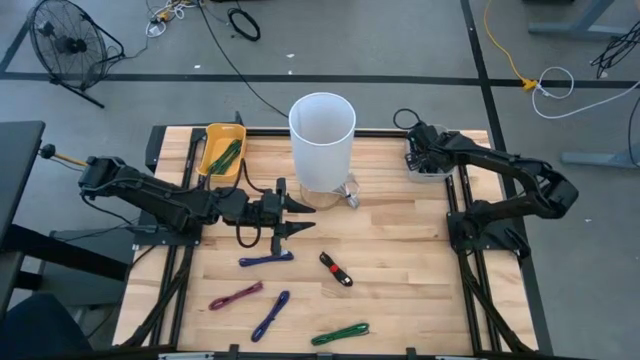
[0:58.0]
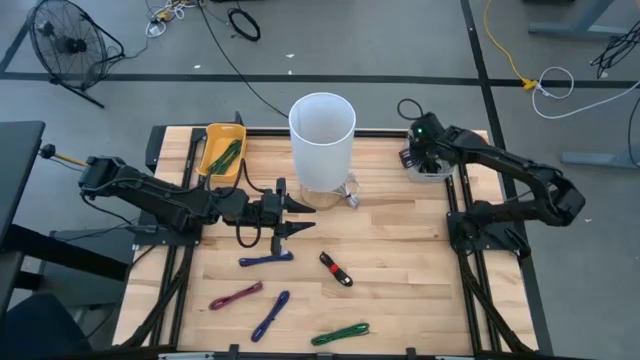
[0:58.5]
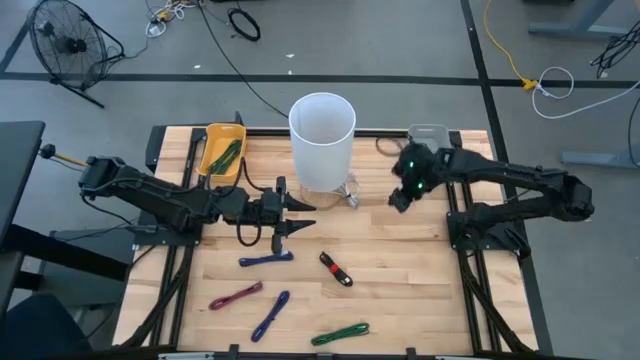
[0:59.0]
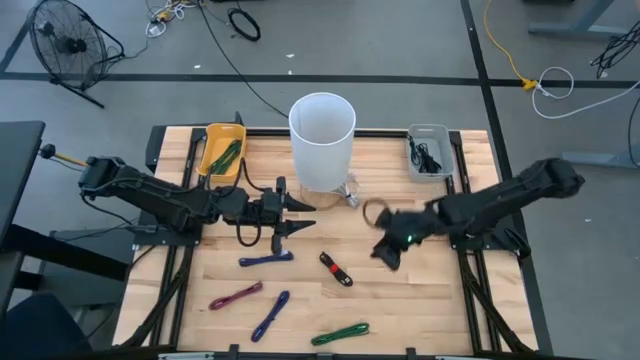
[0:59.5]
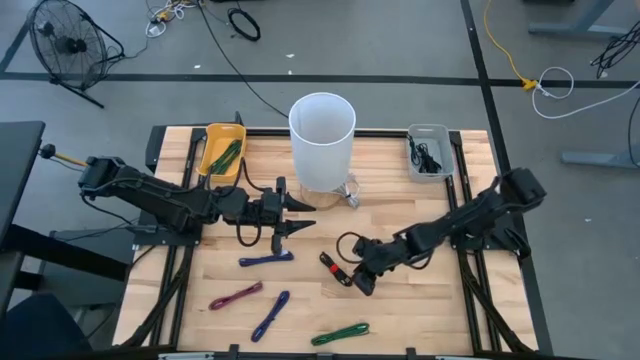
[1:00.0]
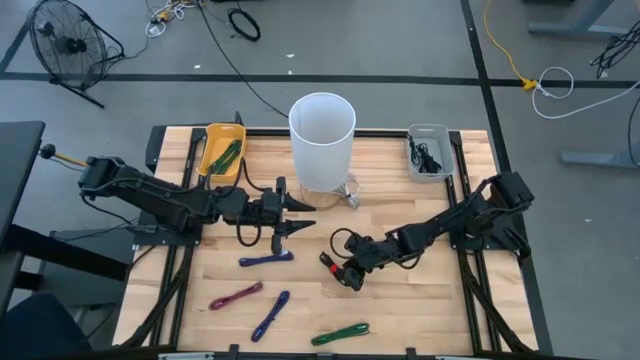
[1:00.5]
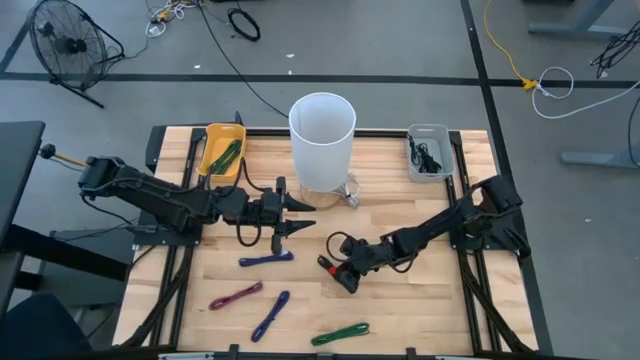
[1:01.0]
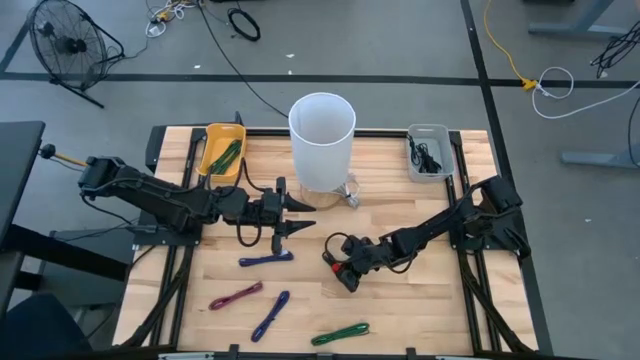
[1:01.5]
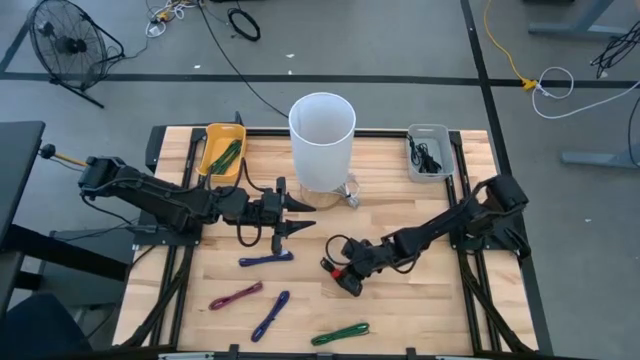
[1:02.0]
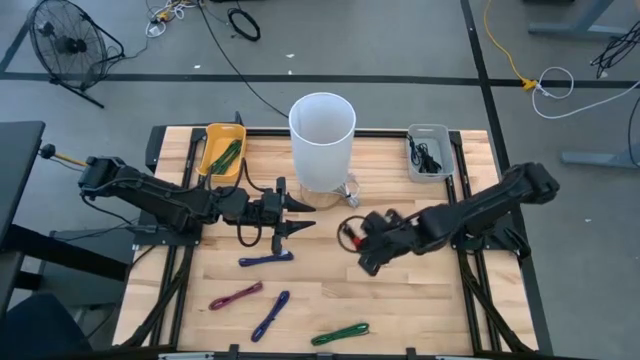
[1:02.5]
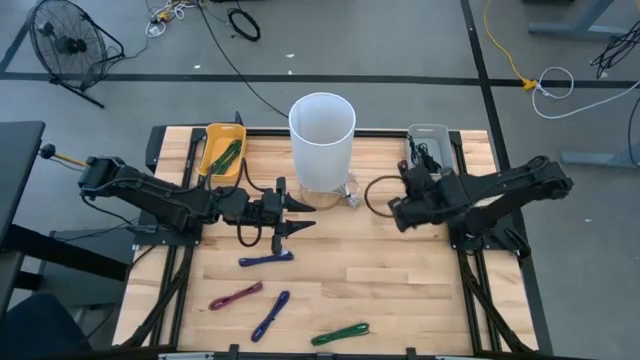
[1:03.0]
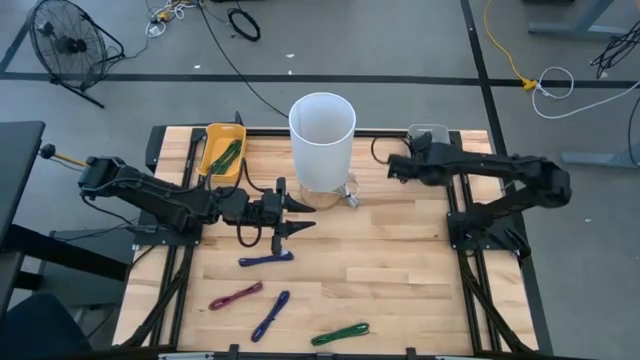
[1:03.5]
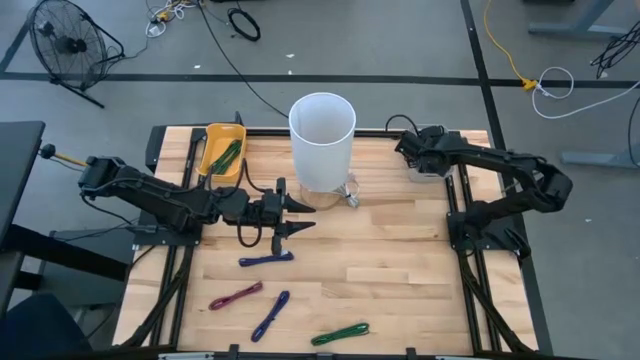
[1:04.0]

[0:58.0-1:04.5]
Task: Pick & Place USB Port
Put the black USB cable into the gray bin

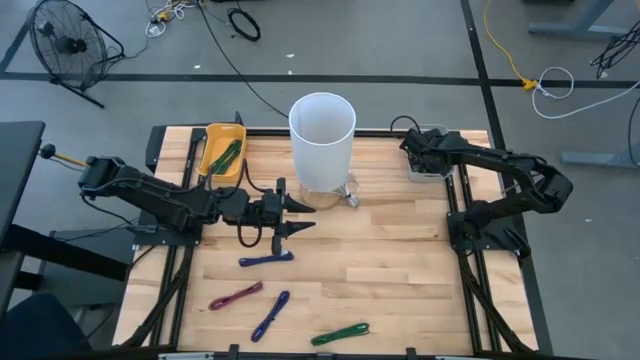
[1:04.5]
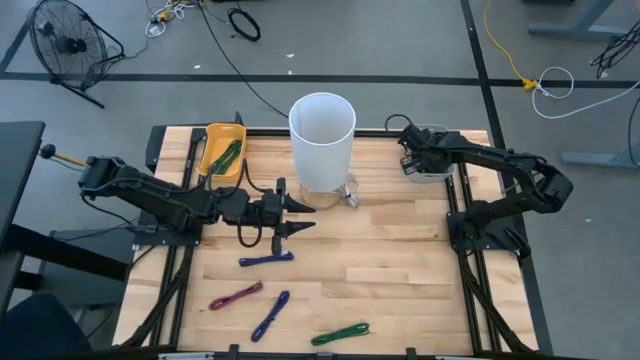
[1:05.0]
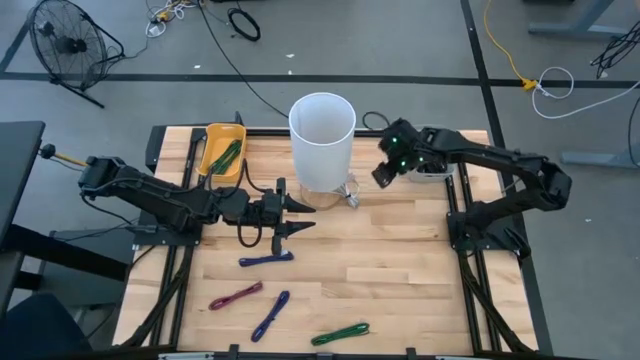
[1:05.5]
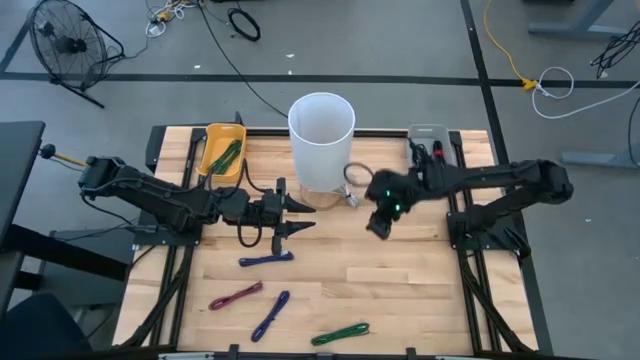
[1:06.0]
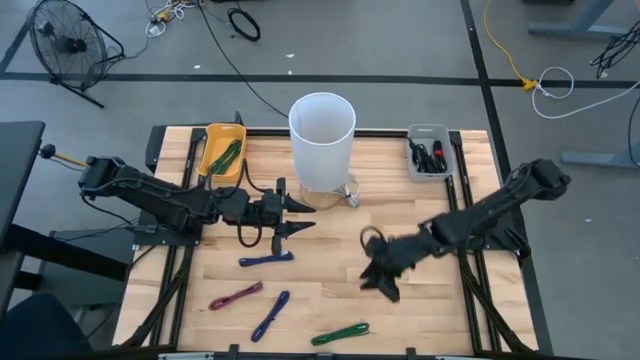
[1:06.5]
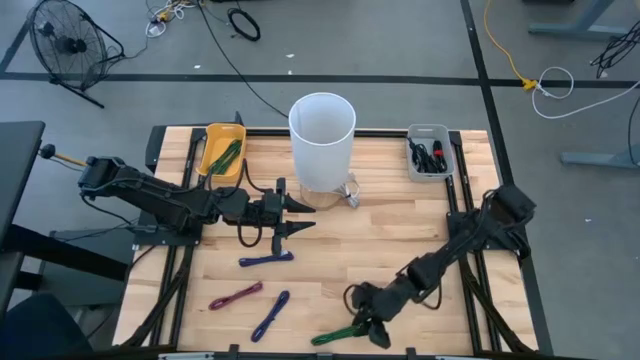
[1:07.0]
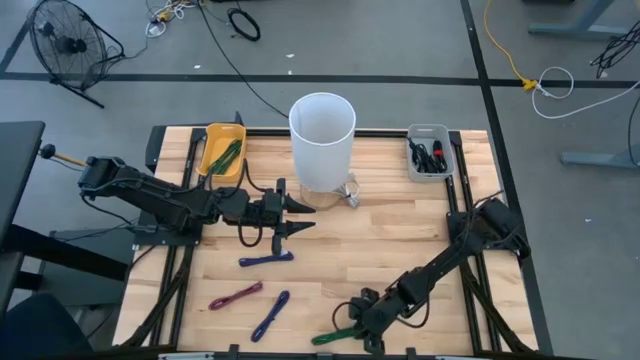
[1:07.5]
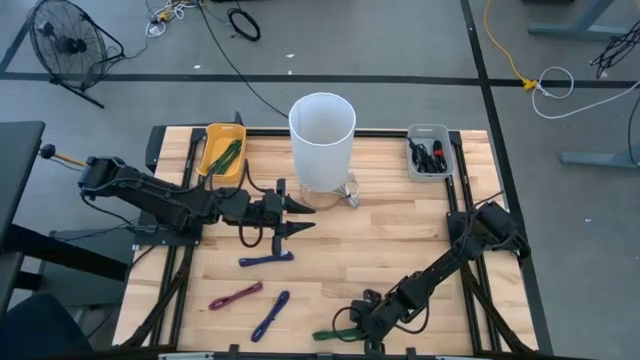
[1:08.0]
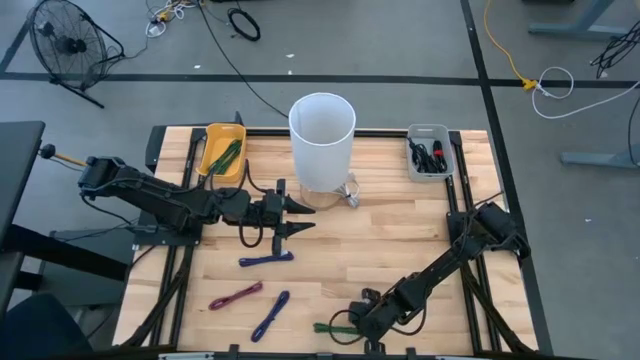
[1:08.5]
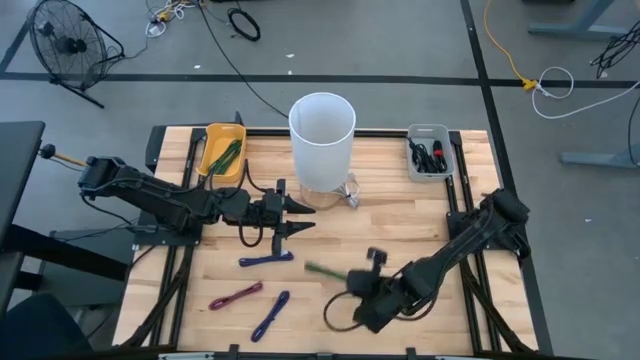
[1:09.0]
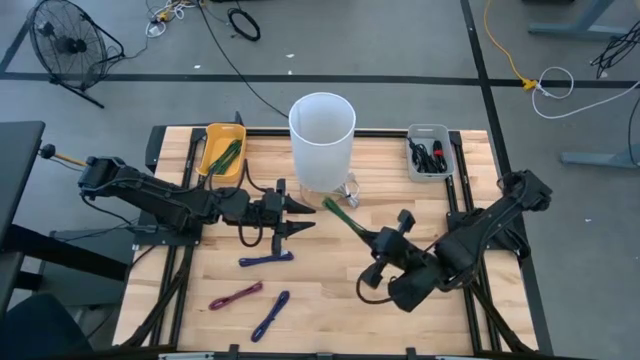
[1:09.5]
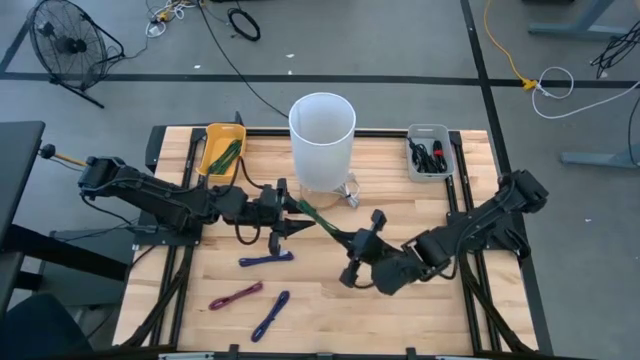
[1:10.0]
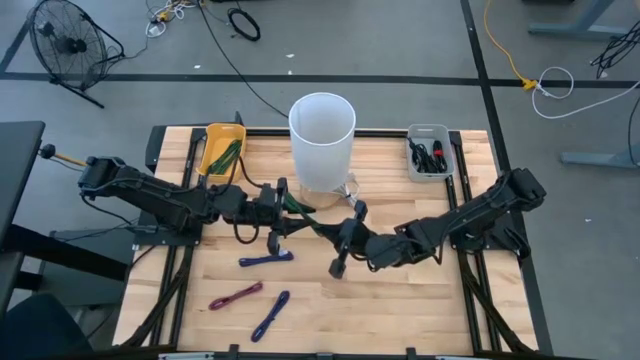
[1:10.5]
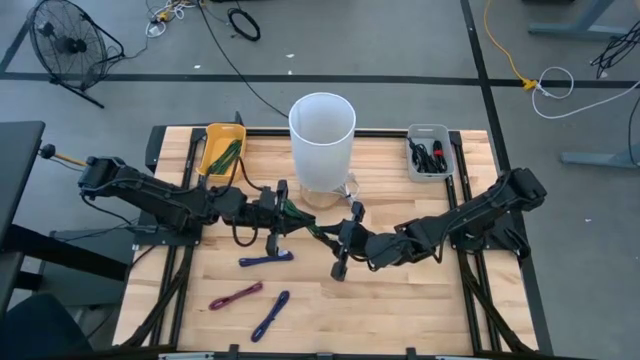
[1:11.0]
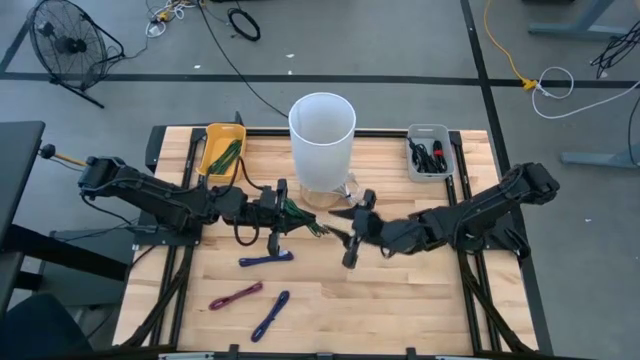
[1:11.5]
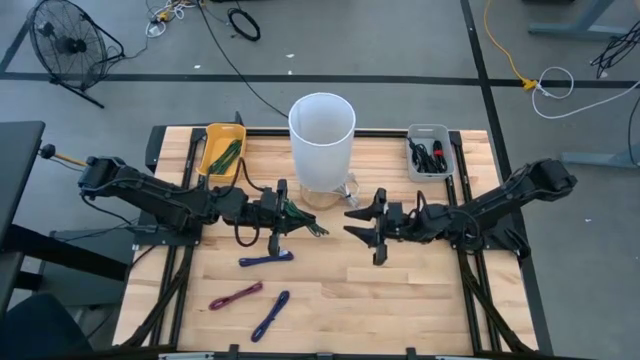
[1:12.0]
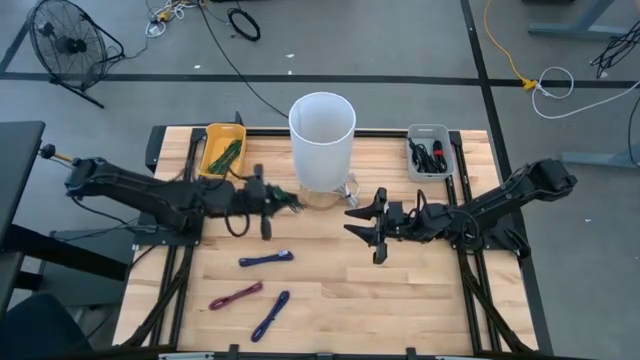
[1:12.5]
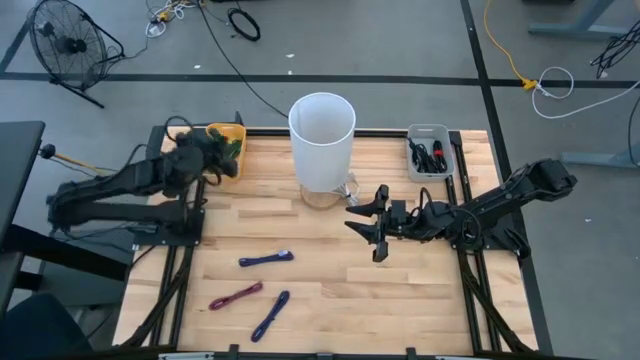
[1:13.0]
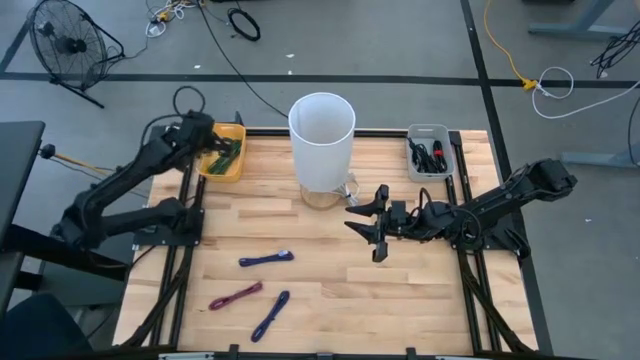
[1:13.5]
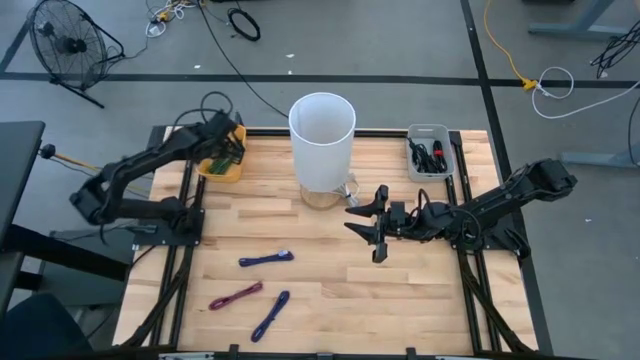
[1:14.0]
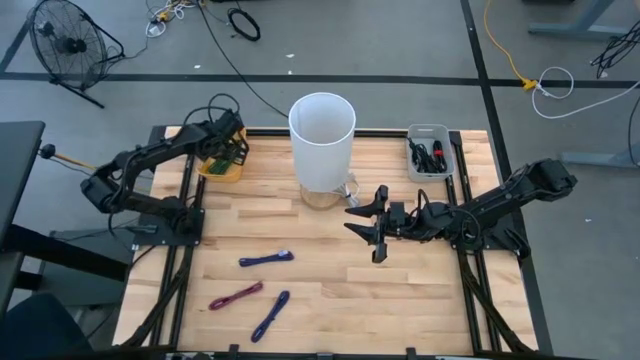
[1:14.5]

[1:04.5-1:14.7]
Put the green USB cable into the yellow bin

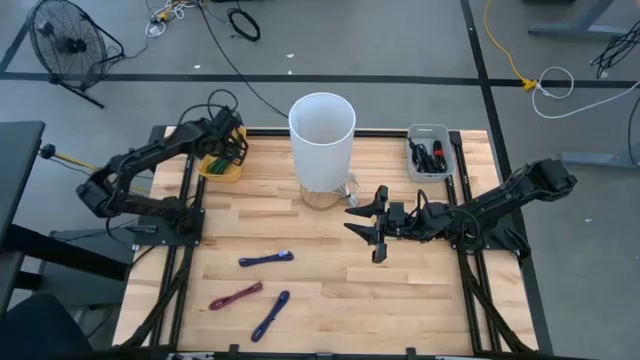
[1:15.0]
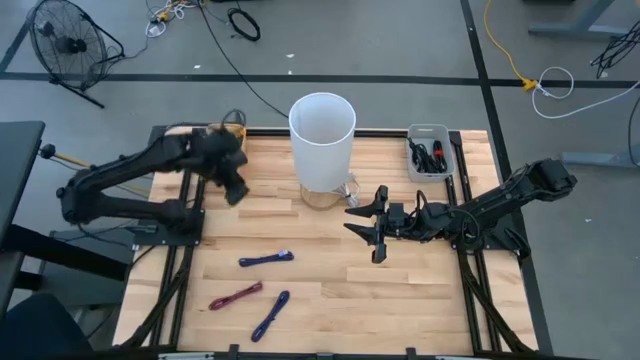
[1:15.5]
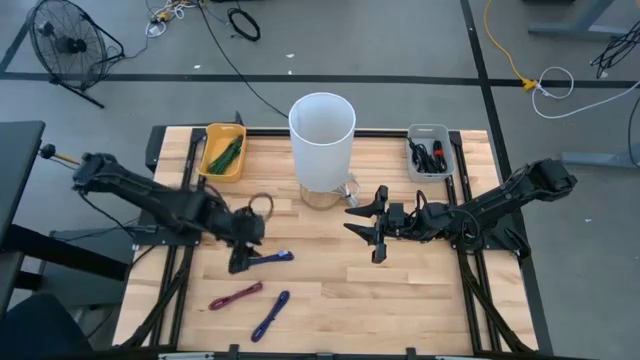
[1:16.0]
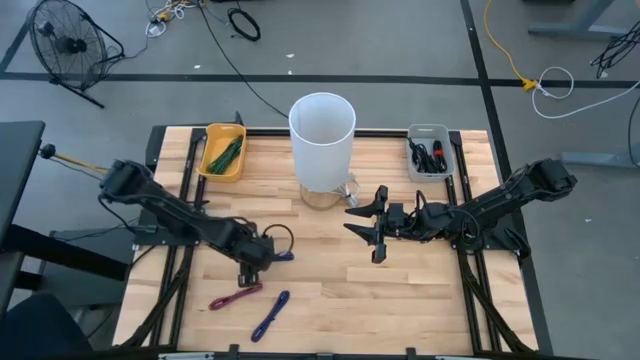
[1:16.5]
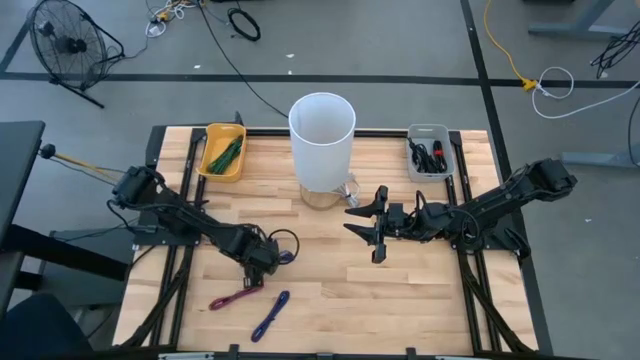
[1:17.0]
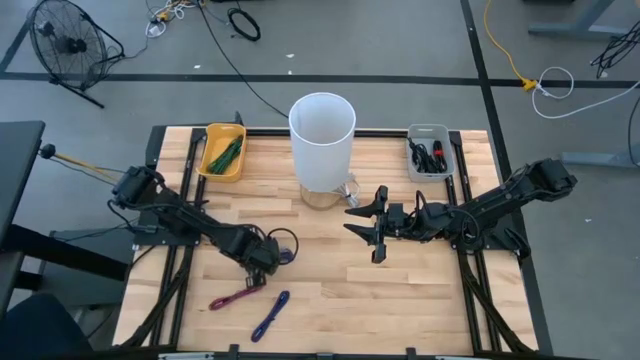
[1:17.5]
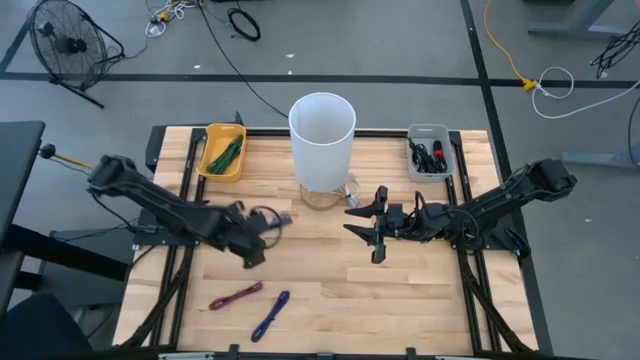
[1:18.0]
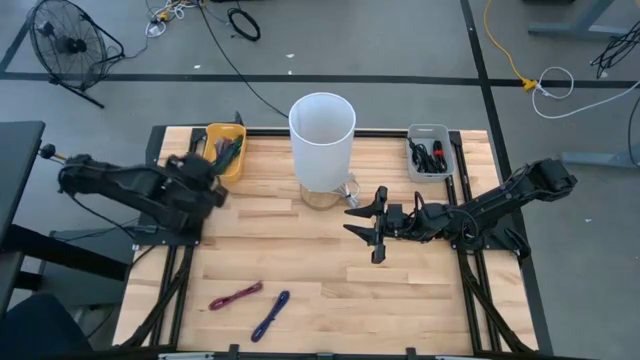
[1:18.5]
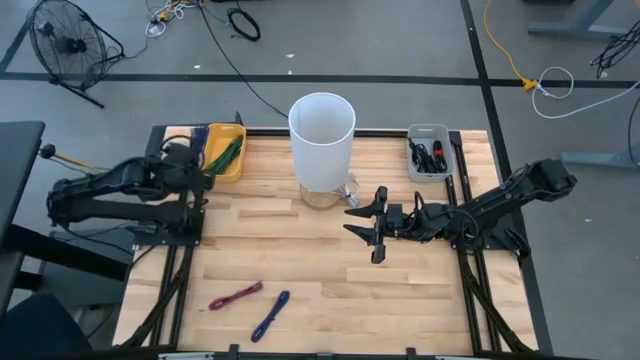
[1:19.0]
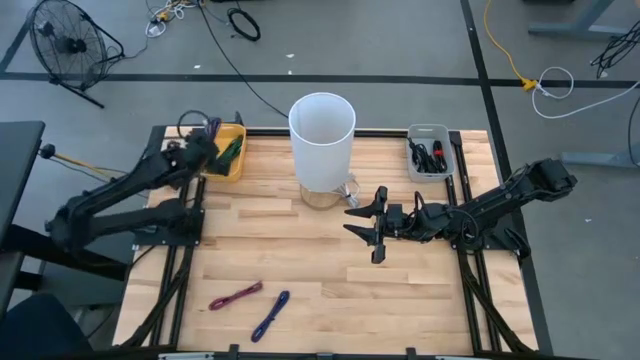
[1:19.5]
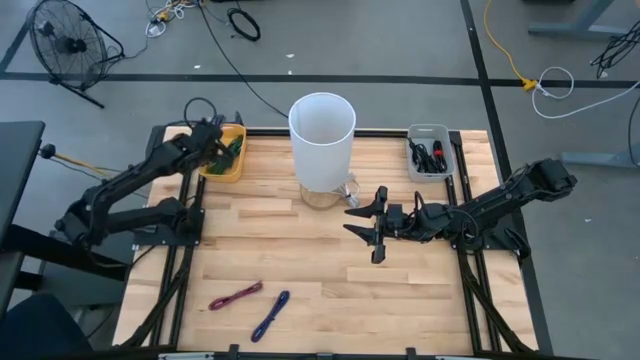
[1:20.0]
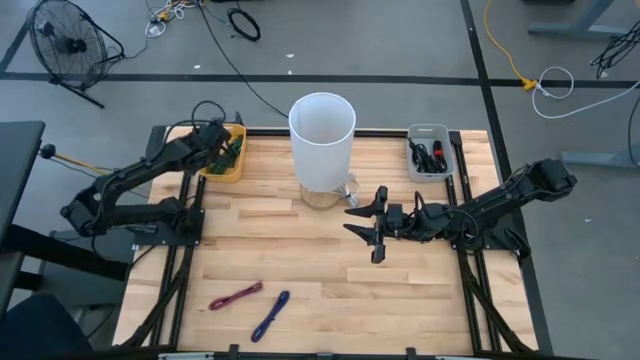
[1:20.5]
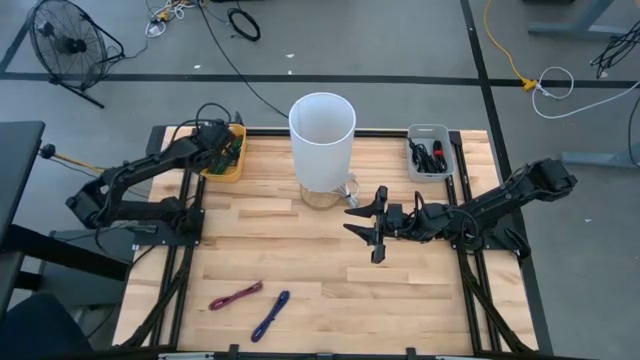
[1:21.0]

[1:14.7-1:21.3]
Put the violet USB cable into the yellow bin
